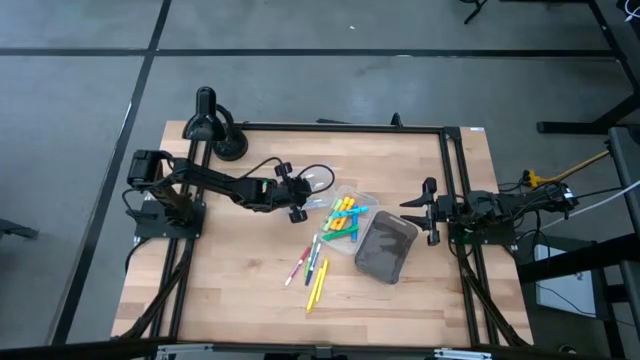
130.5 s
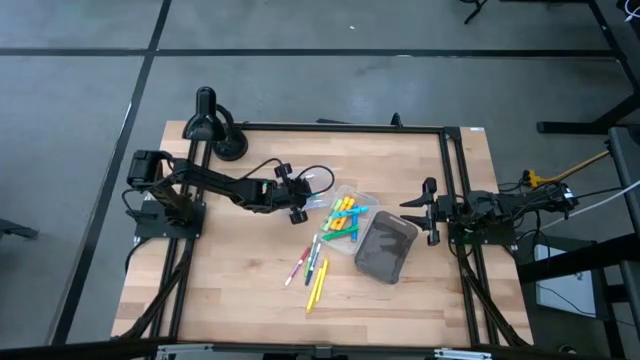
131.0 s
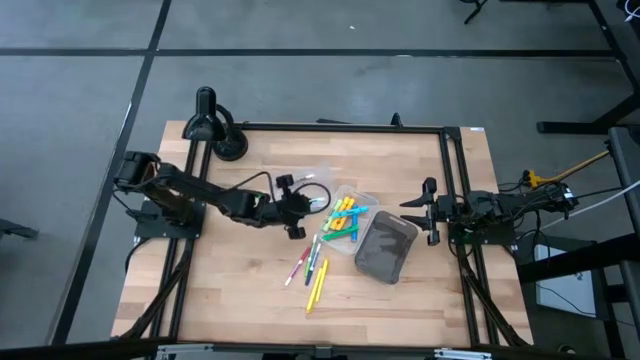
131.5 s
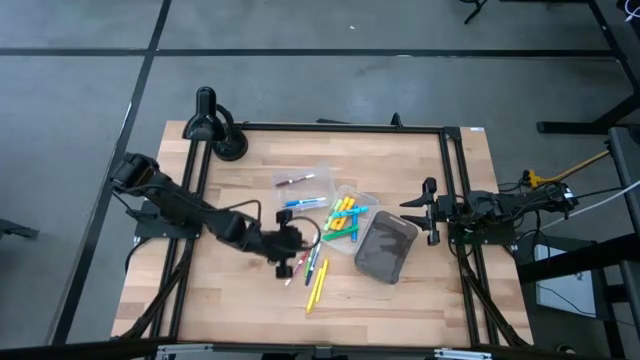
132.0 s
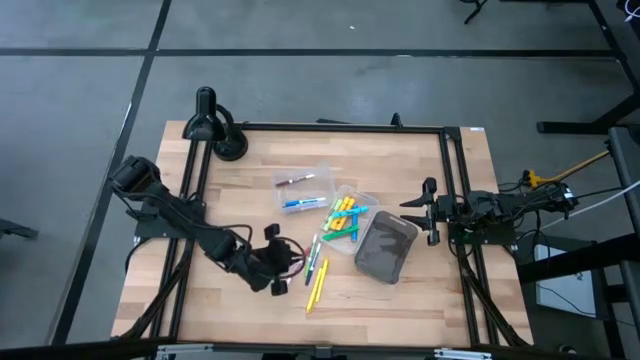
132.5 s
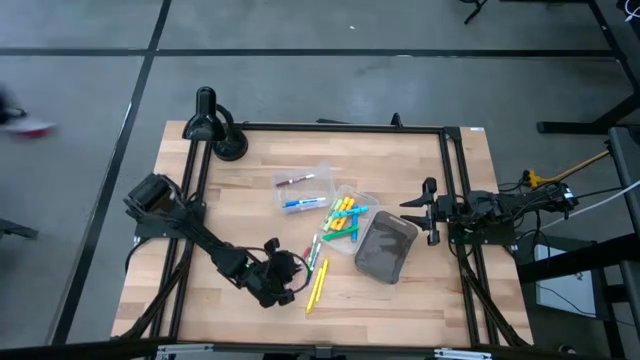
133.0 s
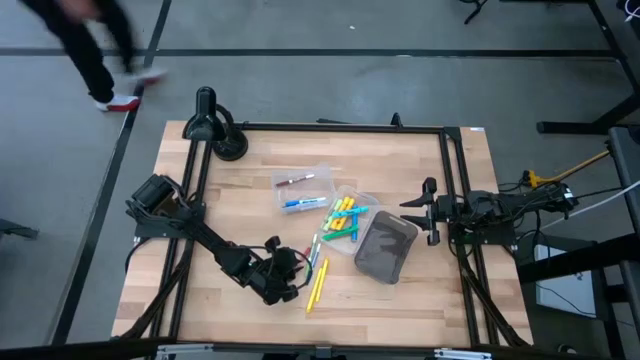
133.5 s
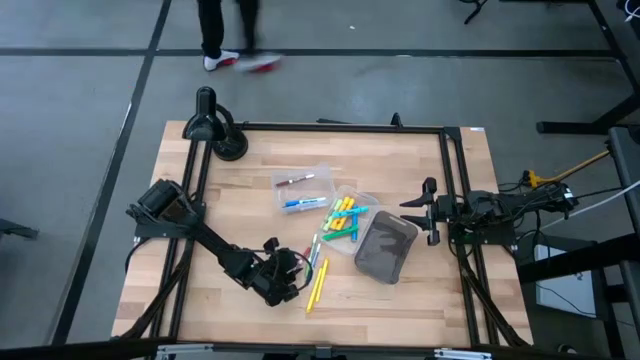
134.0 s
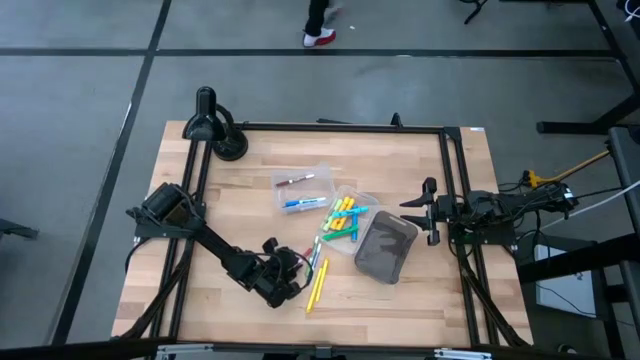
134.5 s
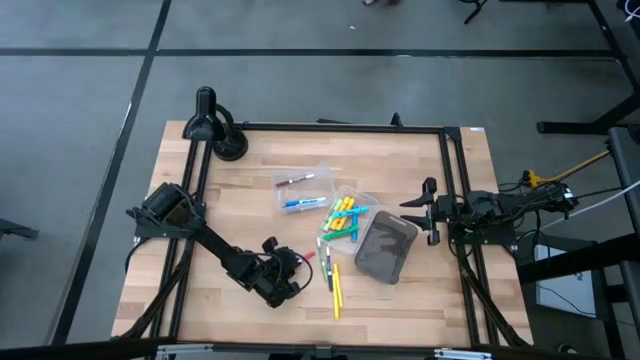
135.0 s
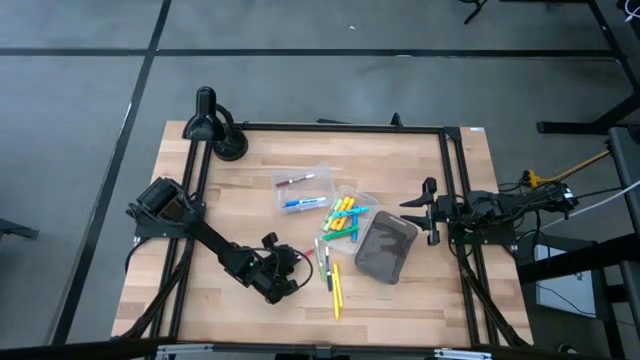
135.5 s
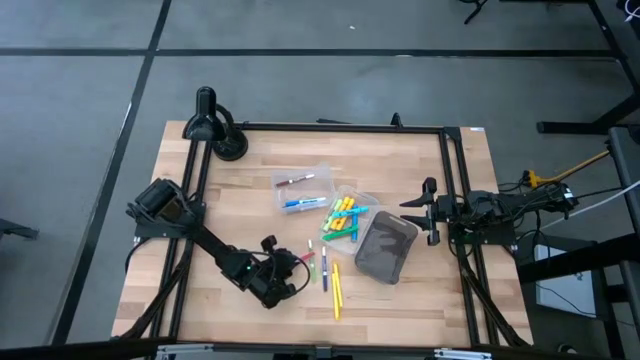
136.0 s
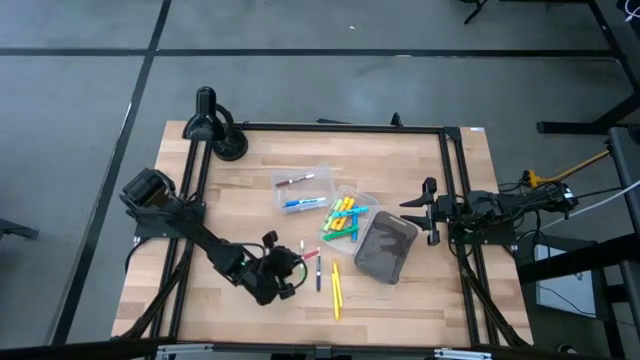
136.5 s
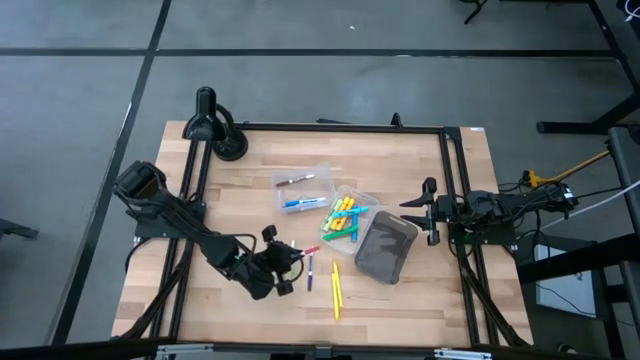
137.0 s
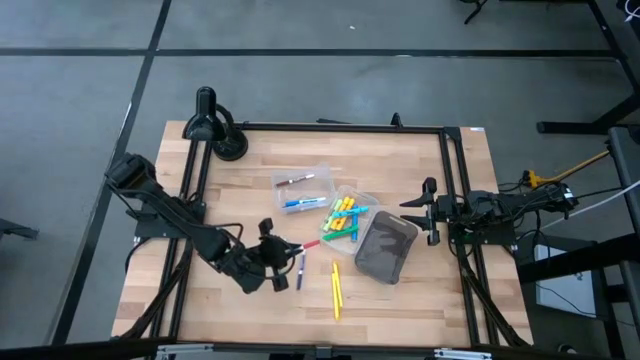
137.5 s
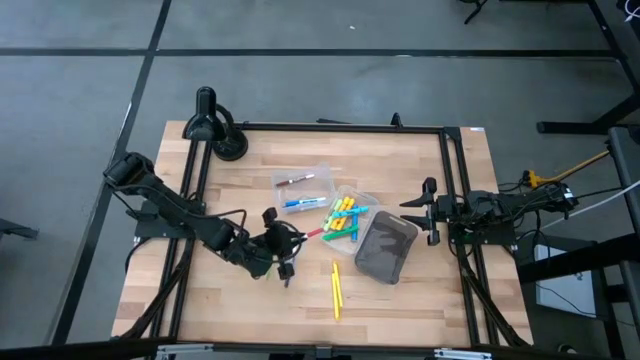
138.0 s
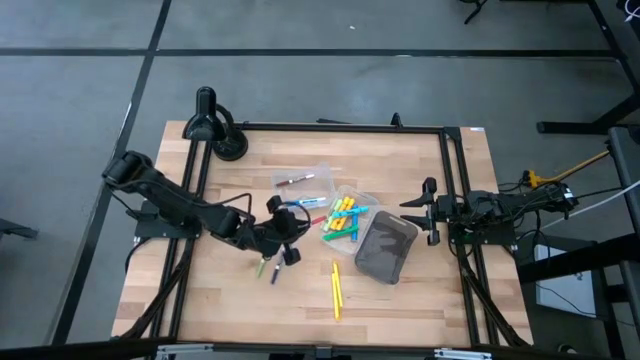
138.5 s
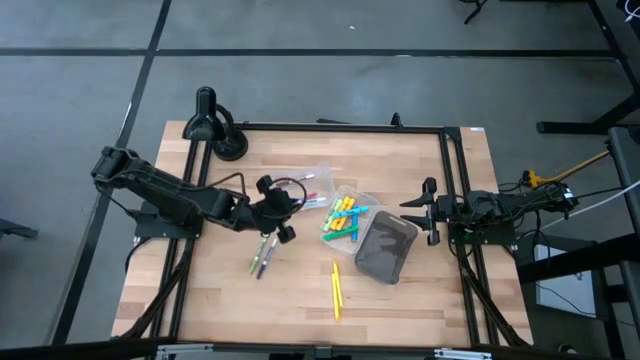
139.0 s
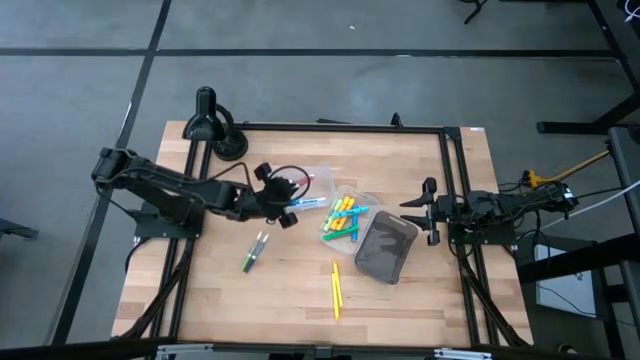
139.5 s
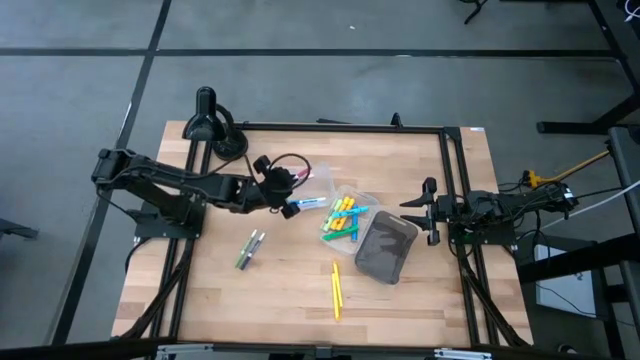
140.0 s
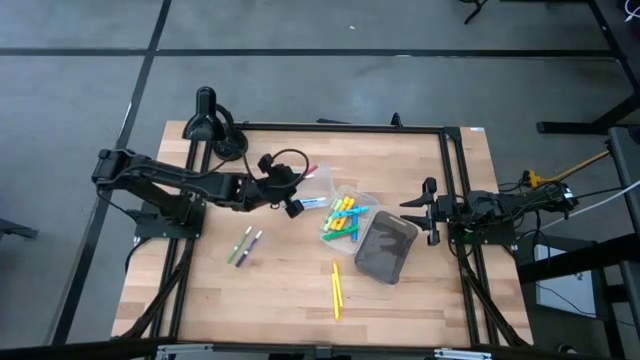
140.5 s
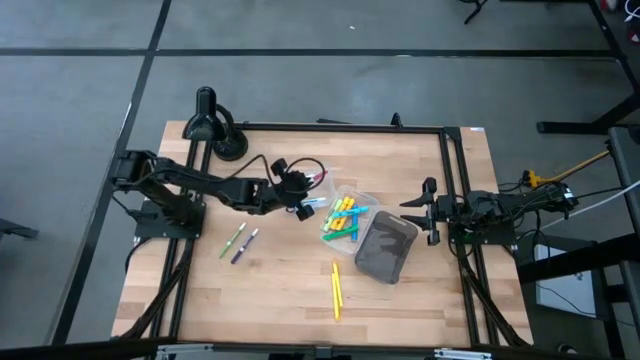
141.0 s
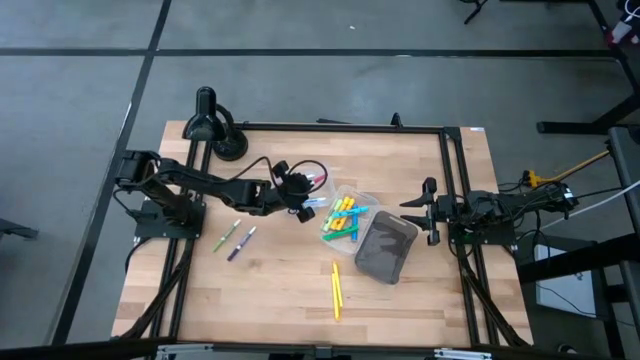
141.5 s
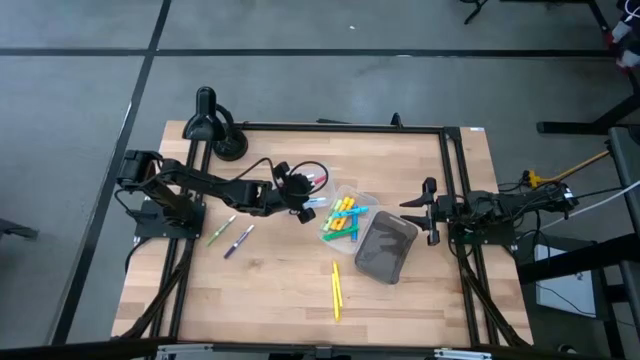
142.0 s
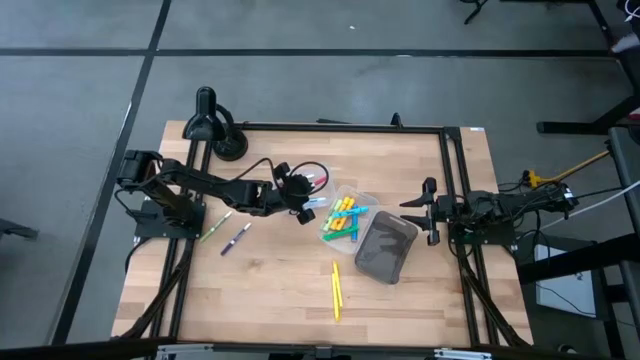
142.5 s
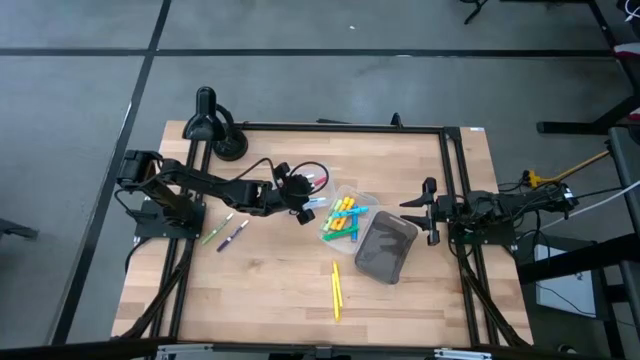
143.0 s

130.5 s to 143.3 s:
Task: Pick & Place Markers
Put the pink marker pen into the left transparent bin

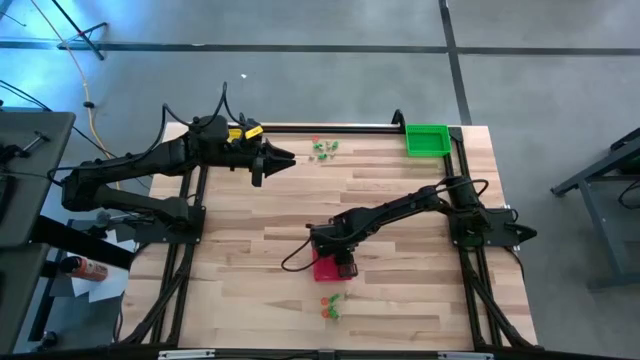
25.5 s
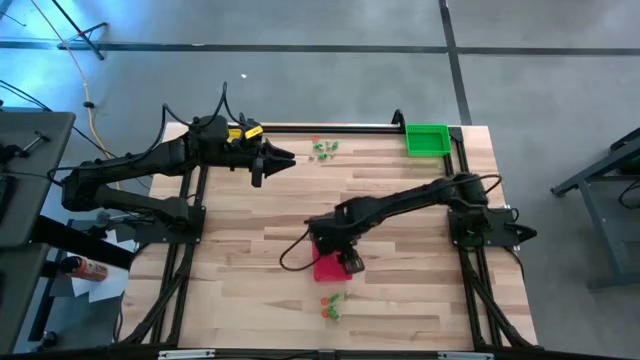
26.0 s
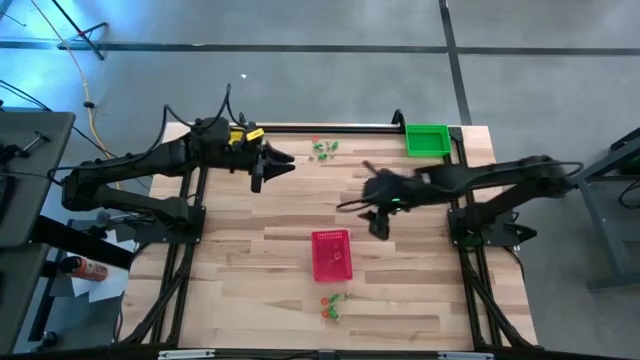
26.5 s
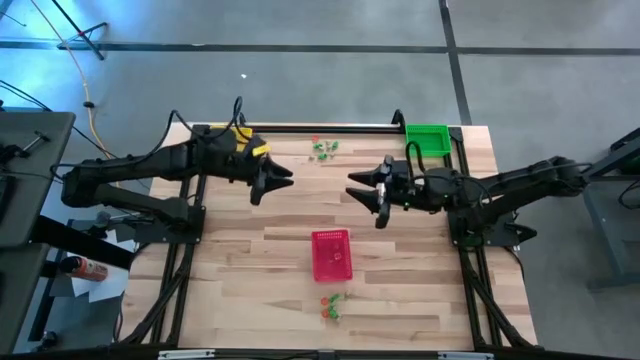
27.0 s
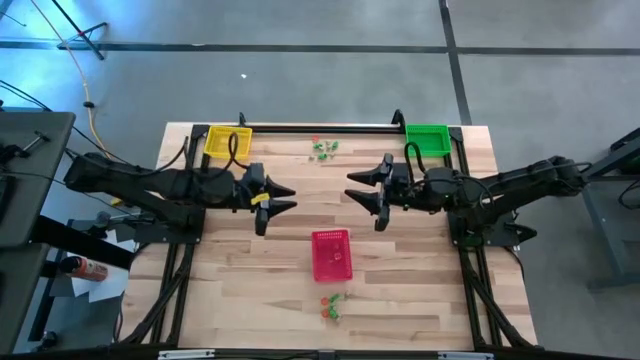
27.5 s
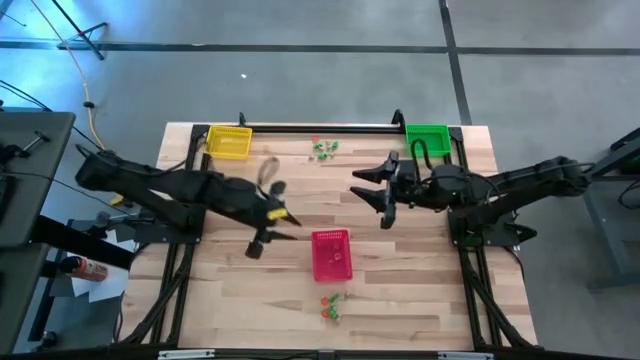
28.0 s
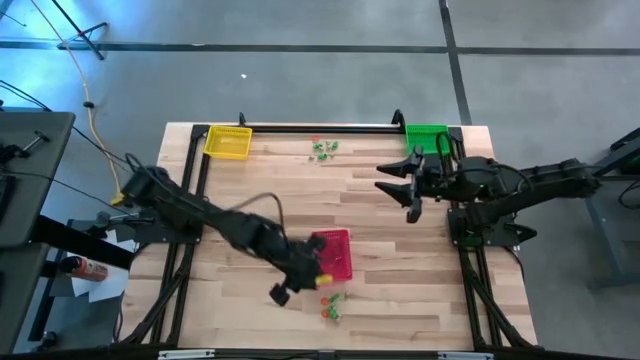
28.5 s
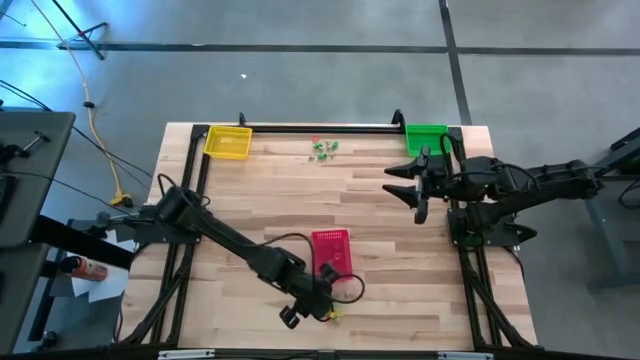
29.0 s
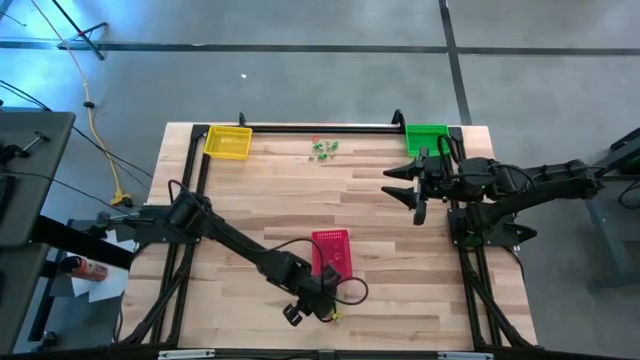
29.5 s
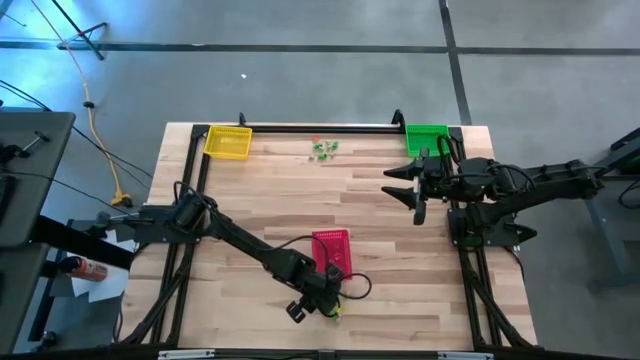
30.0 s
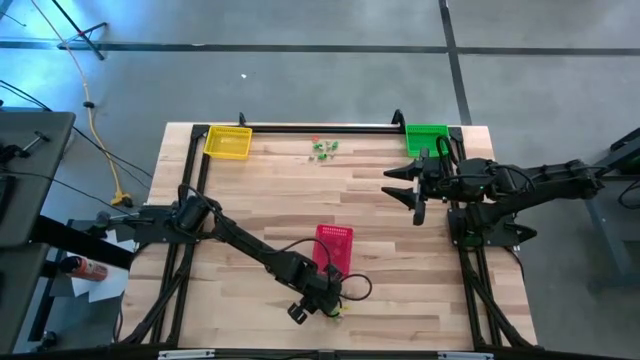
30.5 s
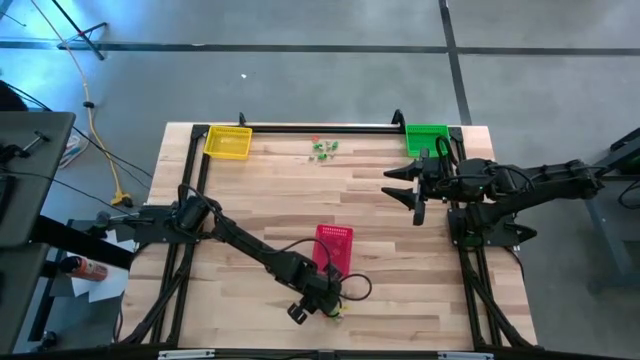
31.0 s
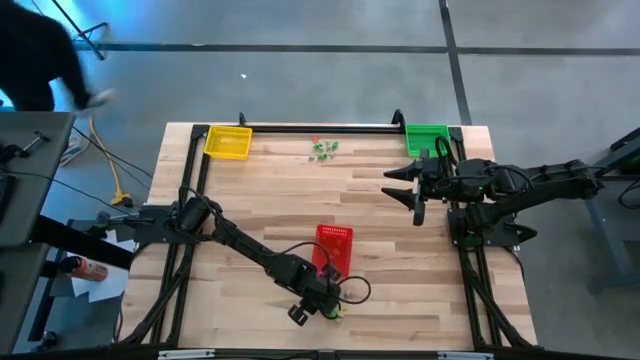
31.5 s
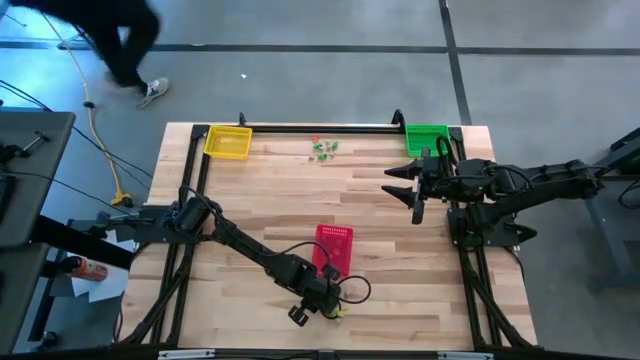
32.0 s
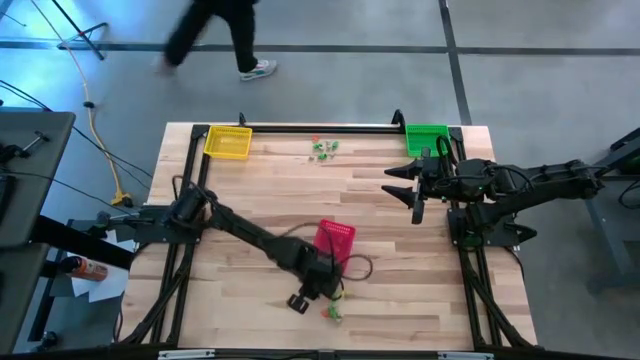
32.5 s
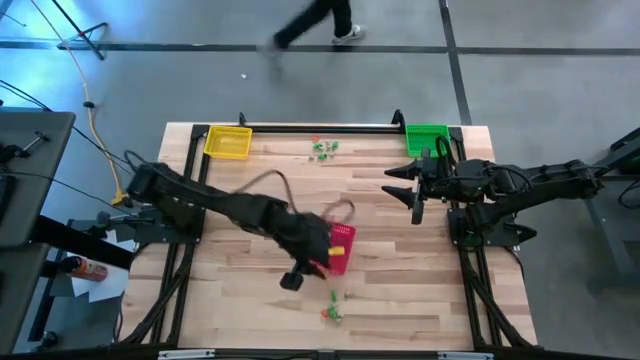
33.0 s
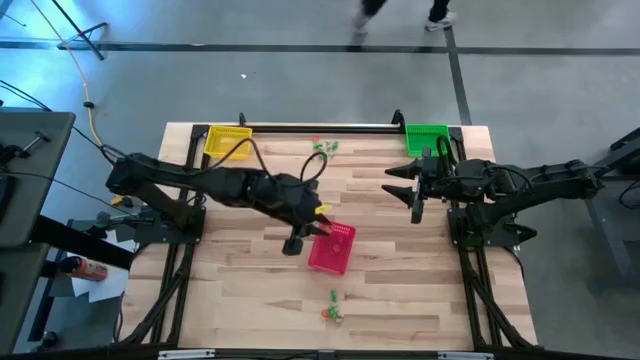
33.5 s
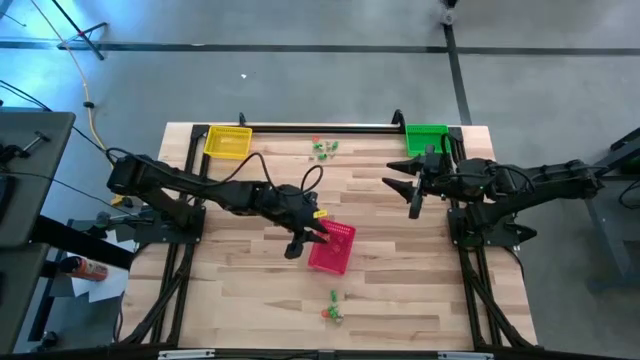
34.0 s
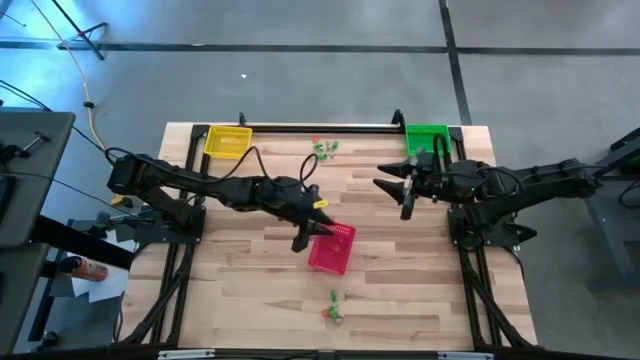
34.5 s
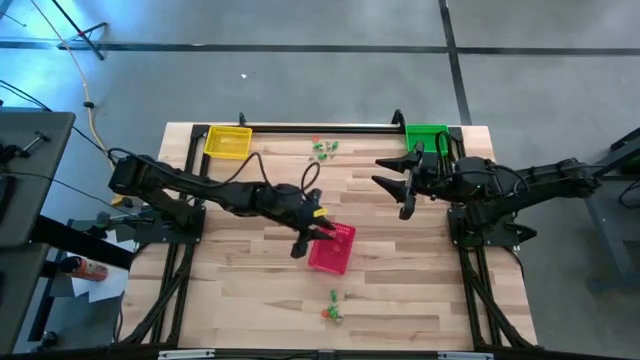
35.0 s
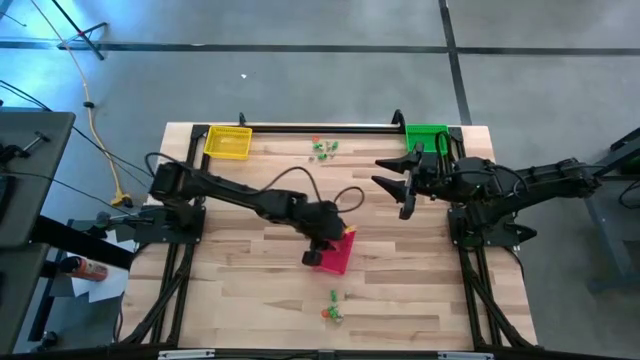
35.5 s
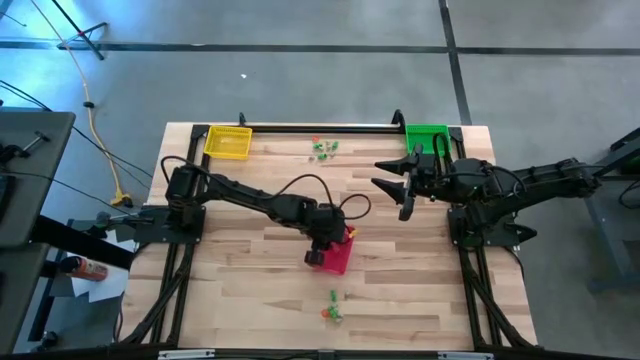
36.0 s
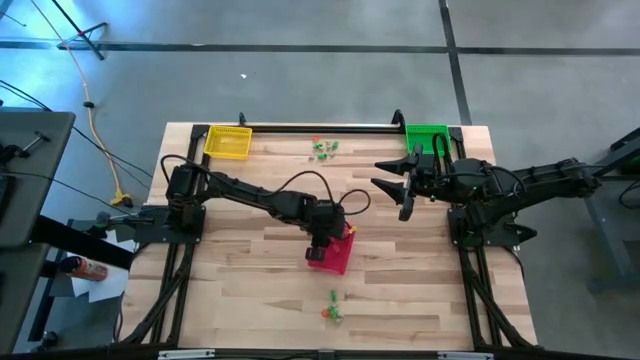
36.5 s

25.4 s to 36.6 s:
Task: Sort Halloween decoration
Put the orange pumpkin toy into the red bin
